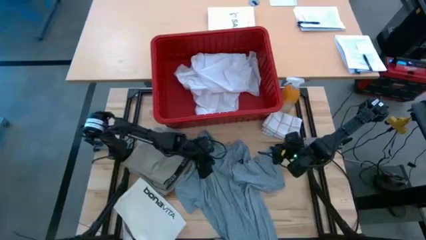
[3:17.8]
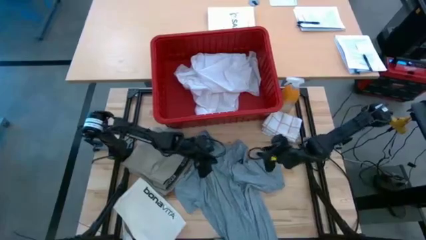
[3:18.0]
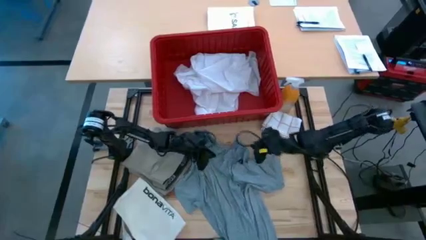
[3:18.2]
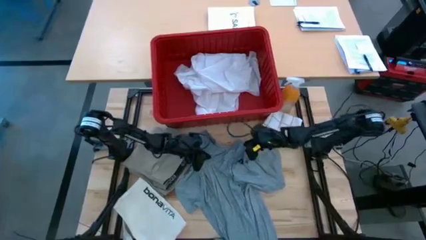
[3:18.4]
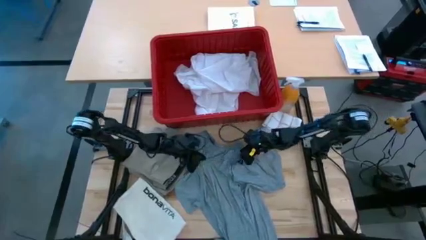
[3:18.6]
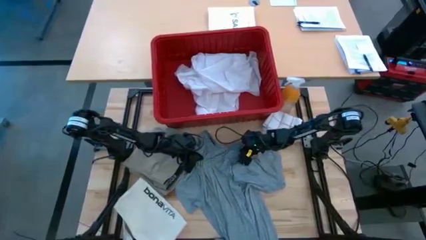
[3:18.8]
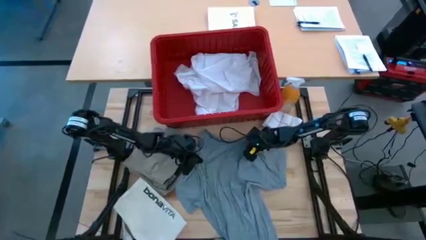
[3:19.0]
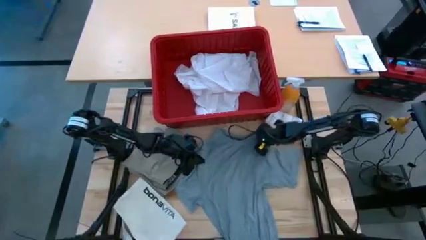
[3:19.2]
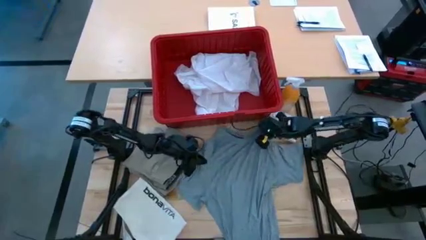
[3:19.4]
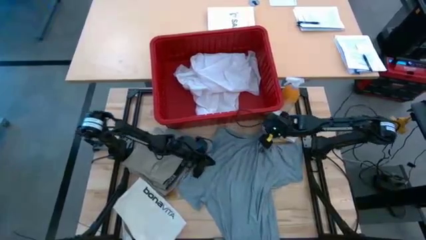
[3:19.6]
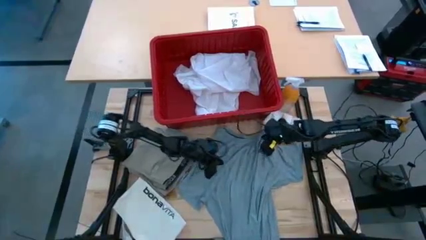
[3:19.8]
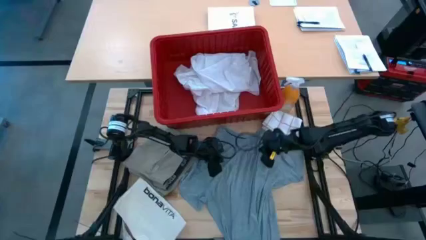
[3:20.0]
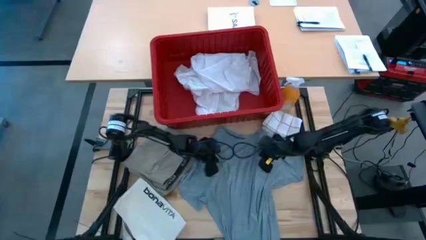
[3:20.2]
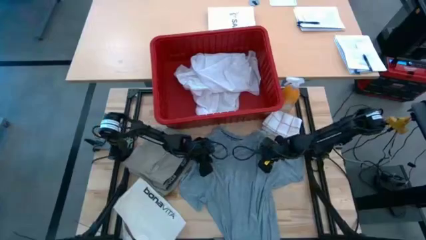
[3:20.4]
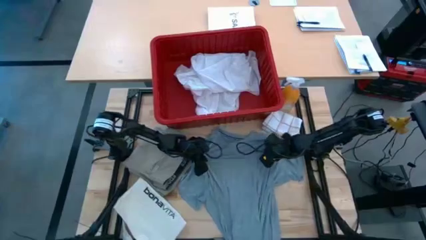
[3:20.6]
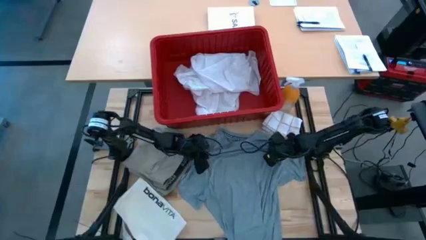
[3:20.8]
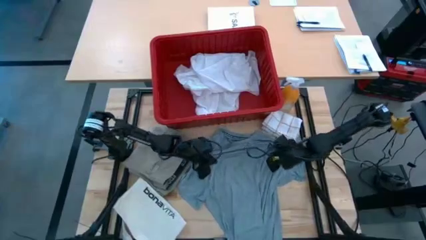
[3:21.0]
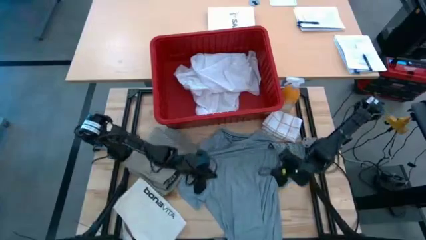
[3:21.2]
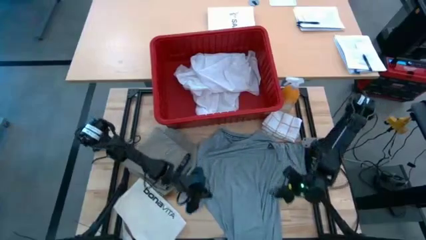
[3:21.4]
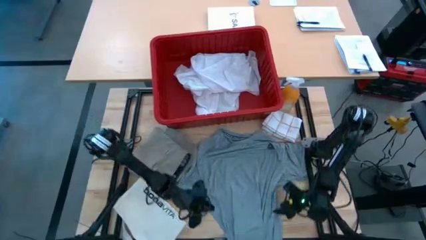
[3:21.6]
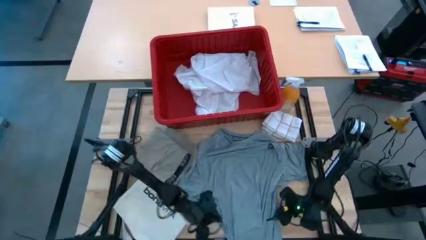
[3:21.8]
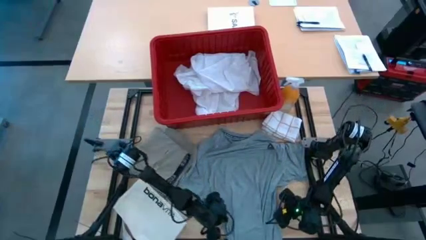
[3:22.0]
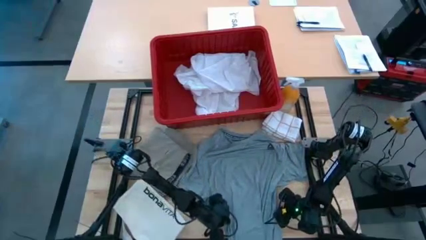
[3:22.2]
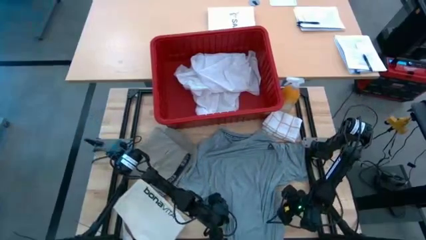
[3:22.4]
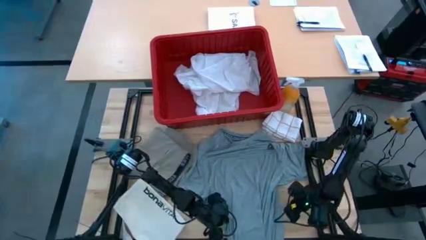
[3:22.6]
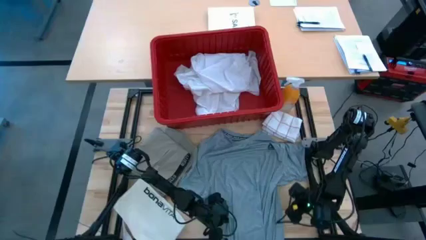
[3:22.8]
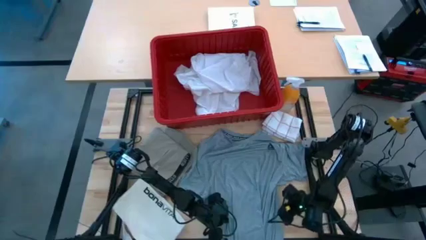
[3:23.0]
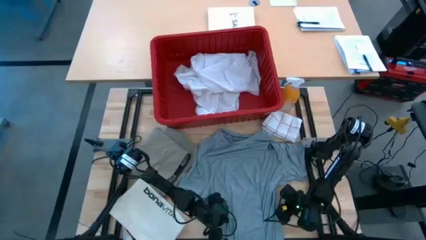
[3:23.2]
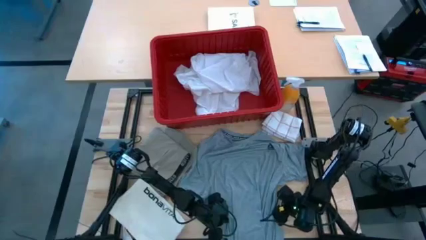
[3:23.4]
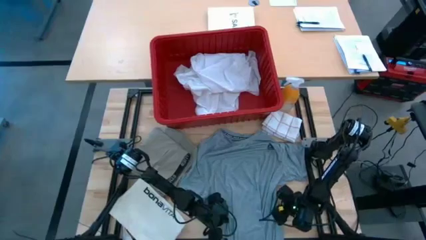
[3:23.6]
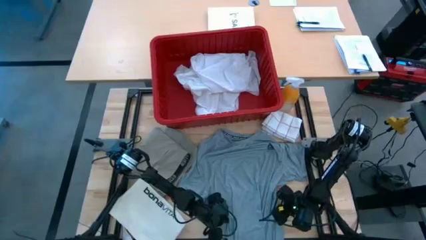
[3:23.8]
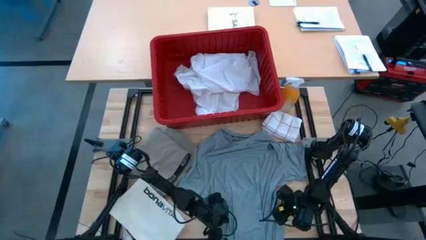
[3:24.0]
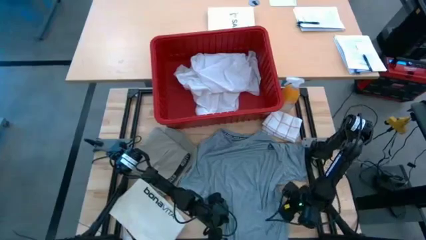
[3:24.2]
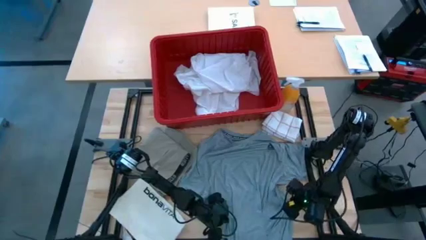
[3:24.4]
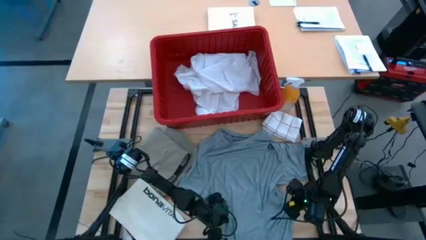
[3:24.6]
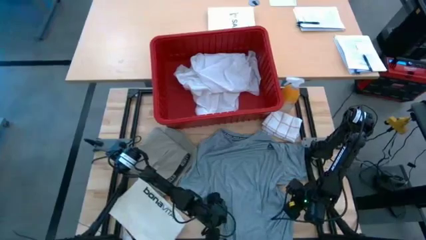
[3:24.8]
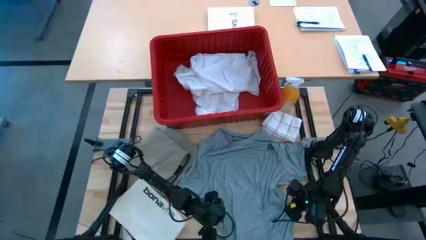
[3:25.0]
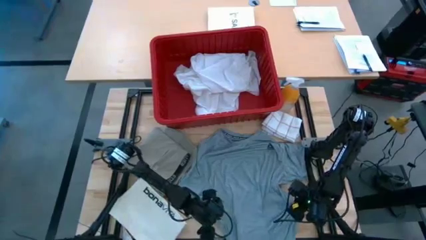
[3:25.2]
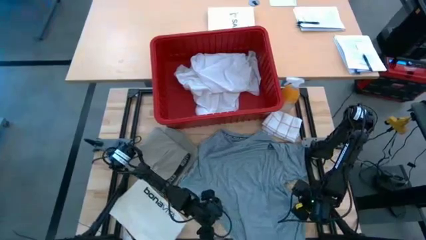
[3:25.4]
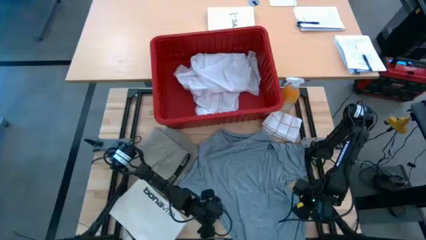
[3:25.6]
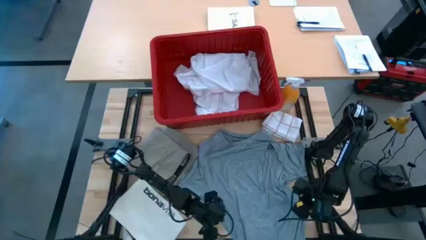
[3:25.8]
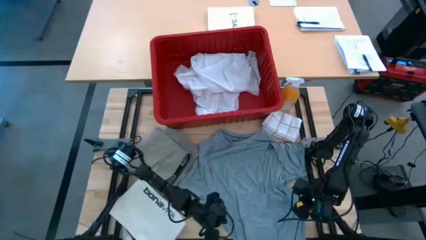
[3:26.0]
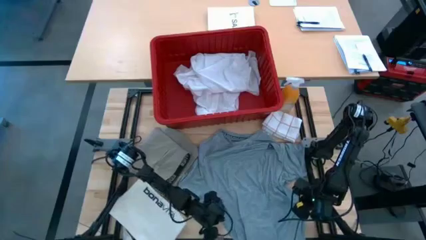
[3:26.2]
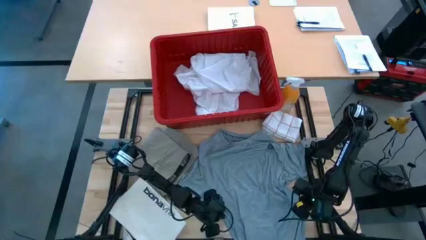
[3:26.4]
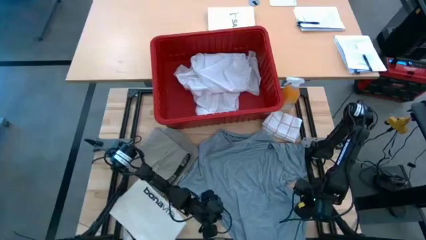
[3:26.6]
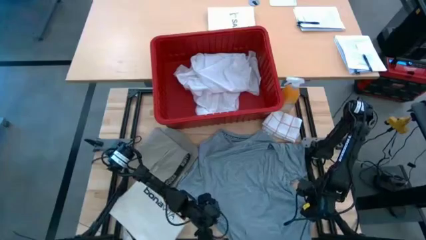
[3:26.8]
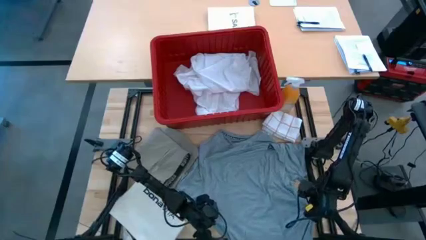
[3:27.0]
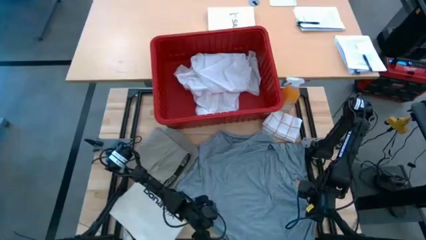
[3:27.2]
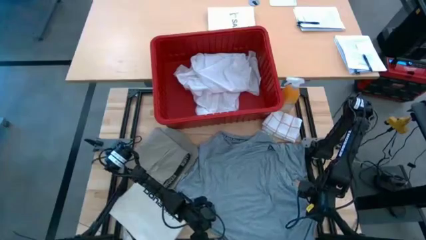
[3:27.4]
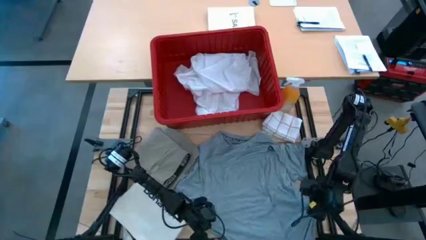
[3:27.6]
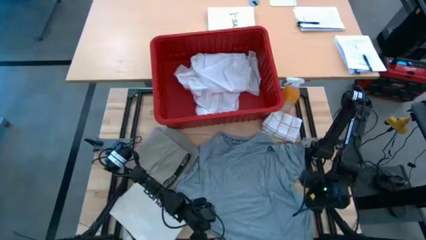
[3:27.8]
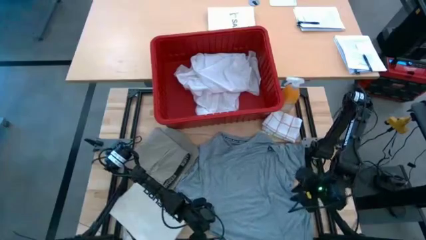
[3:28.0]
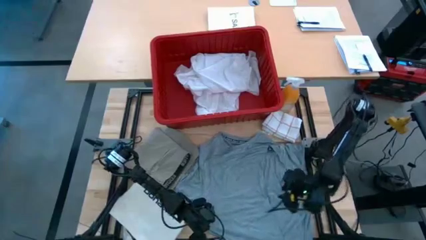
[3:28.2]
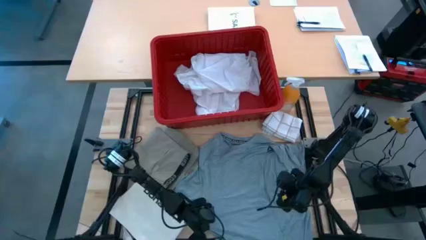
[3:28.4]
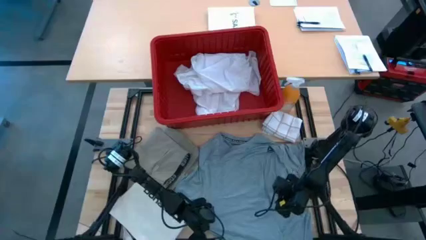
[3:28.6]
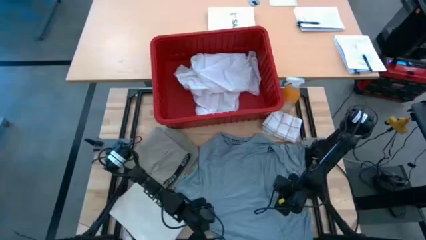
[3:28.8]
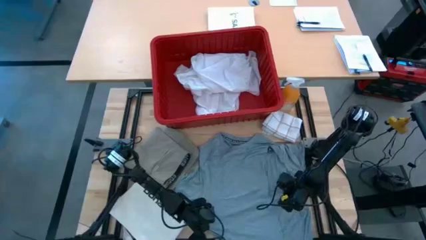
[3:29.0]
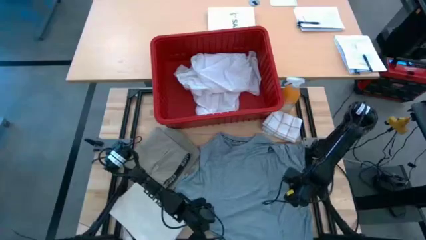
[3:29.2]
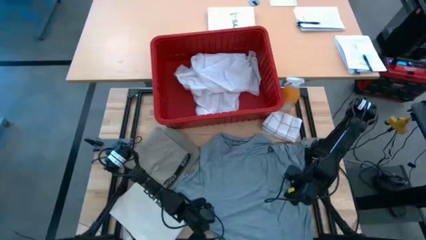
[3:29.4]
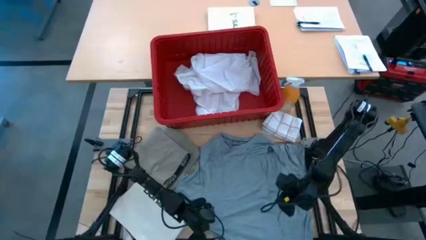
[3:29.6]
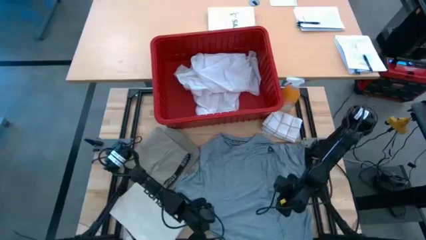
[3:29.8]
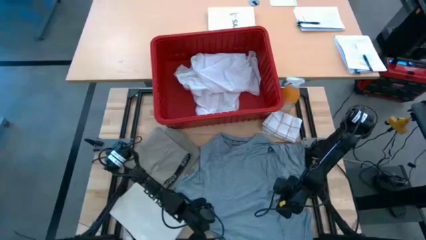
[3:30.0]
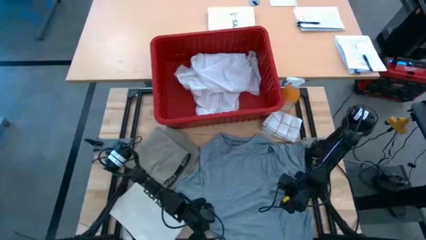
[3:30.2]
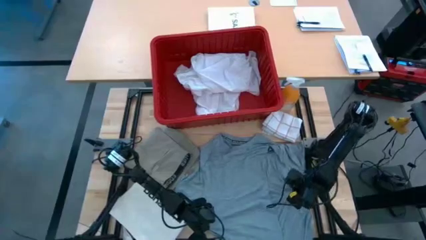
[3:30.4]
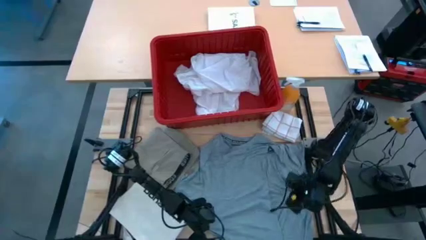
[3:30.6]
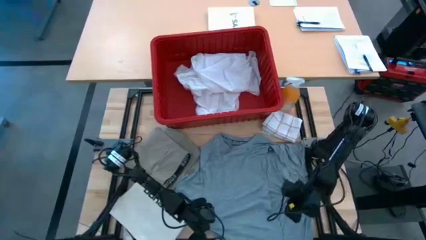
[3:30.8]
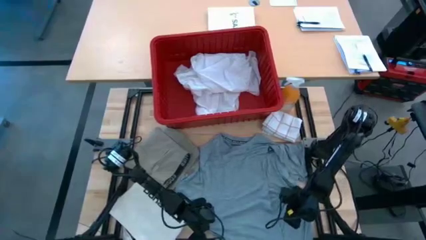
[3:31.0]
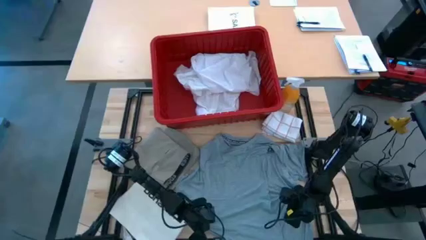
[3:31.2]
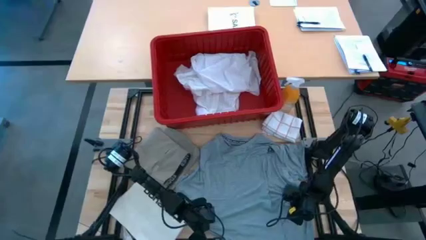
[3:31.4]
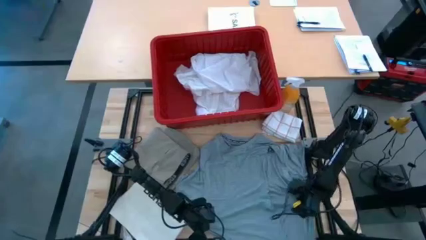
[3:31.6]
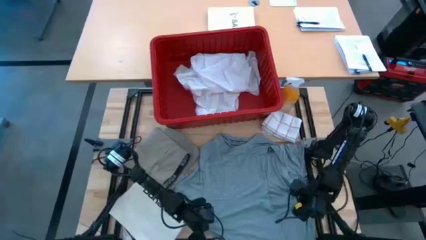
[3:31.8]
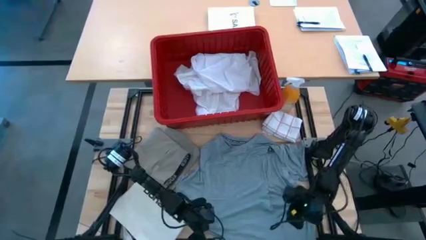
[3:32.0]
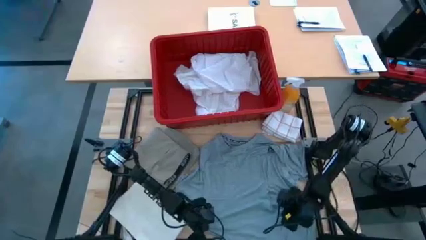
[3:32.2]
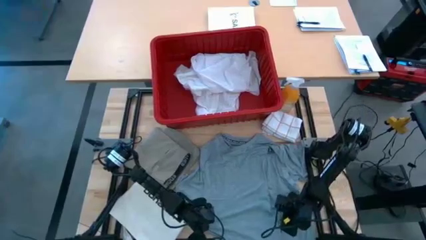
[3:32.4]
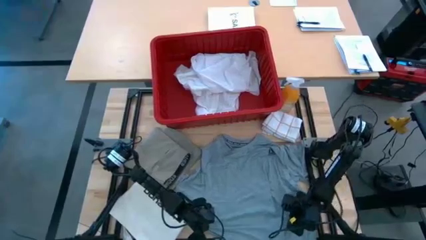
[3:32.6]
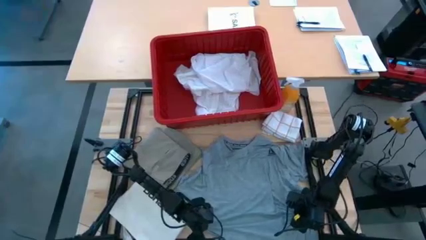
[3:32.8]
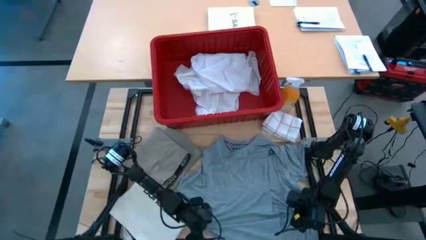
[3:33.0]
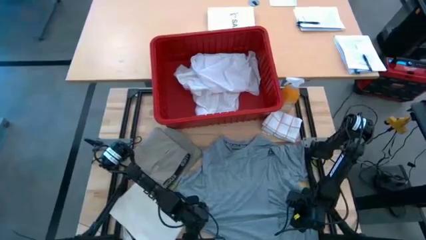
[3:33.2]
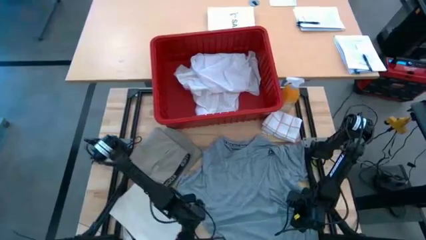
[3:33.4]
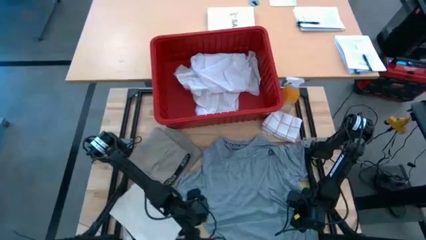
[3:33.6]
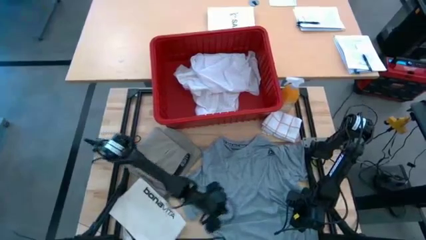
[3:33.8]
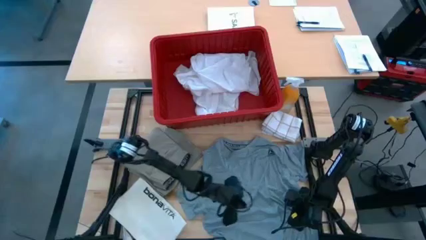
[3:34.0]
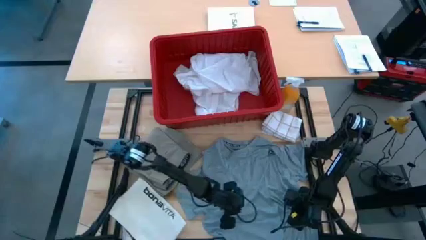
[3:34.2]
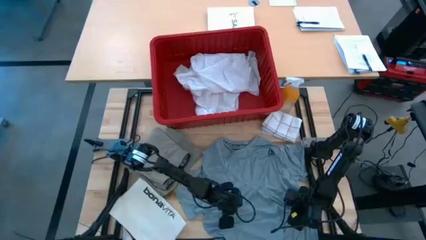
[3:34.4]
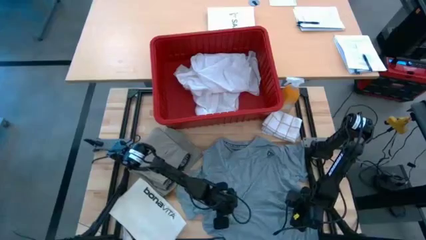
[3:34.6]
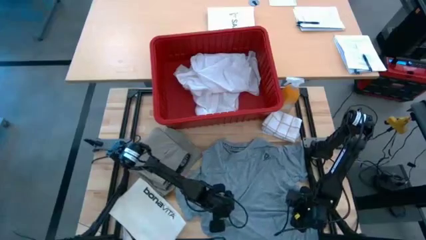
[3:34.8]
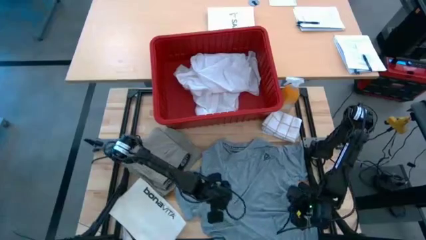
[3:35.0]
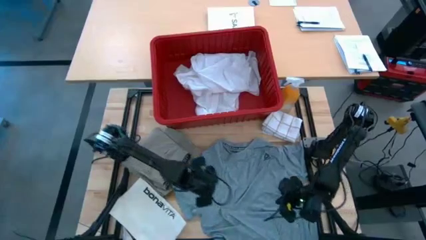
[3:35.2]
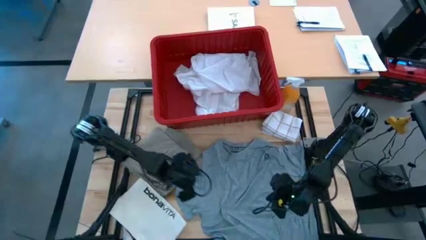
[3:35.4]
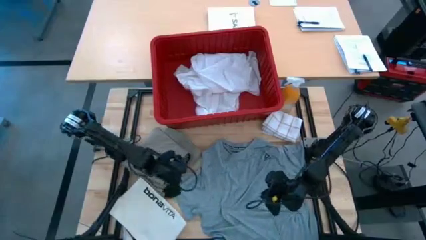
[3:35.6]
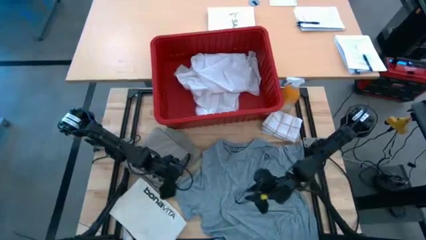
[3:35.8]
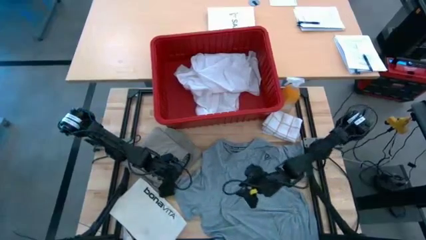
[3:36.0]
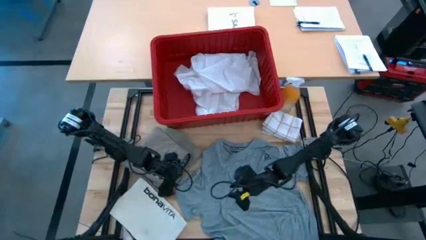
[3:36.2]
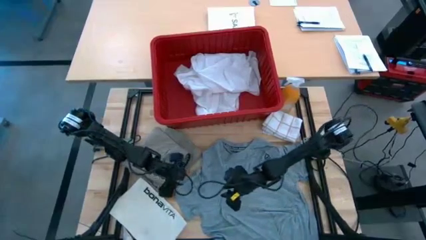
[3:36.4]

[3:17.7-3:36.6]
Task: Fold laundry
Fold the gray shirt
